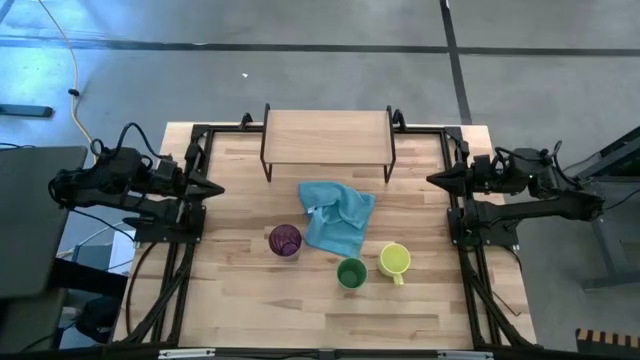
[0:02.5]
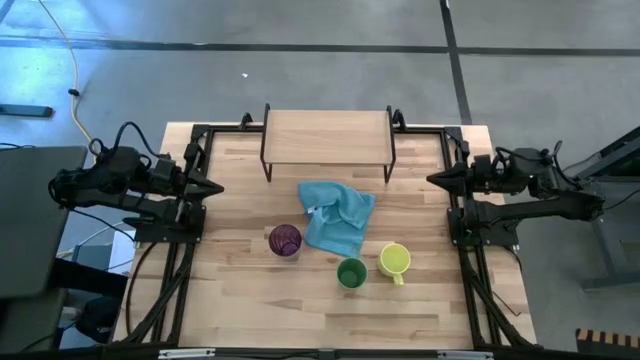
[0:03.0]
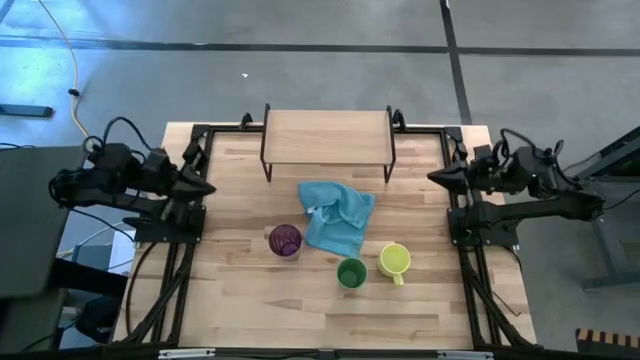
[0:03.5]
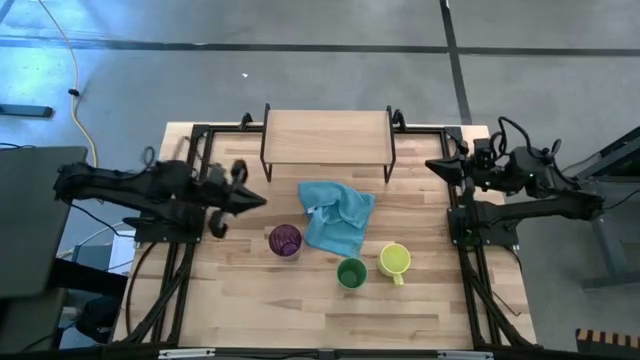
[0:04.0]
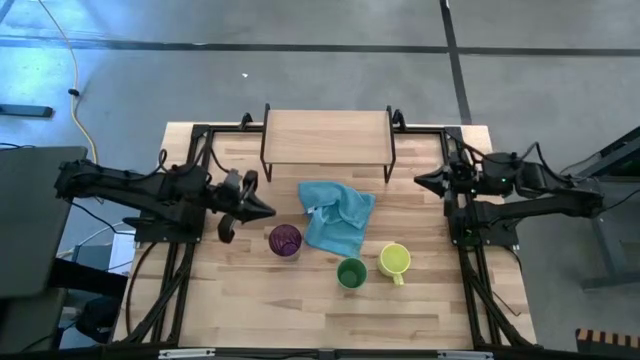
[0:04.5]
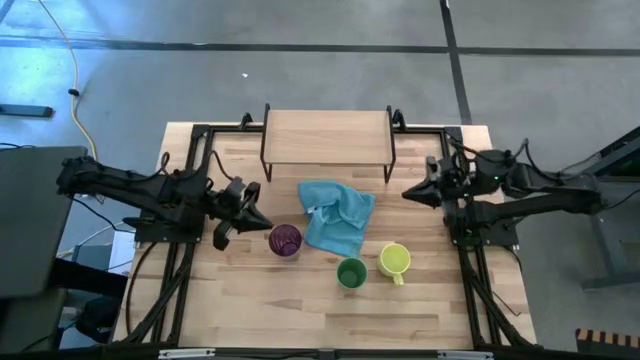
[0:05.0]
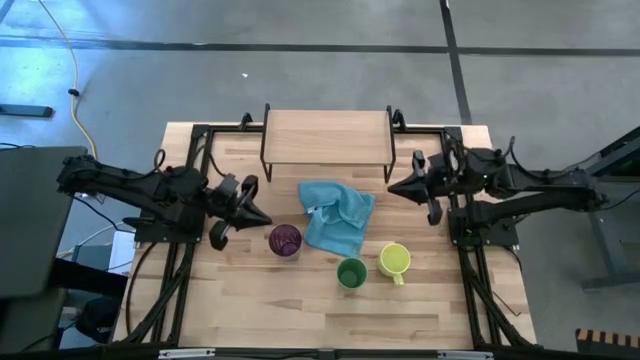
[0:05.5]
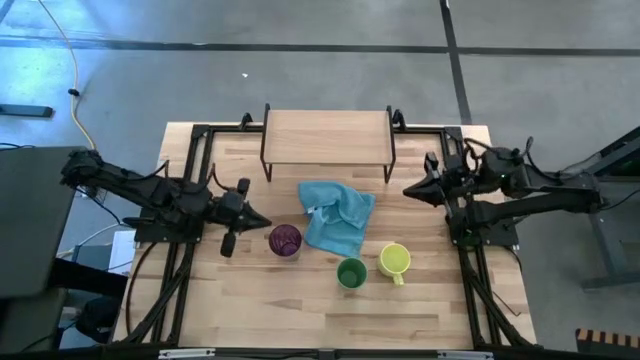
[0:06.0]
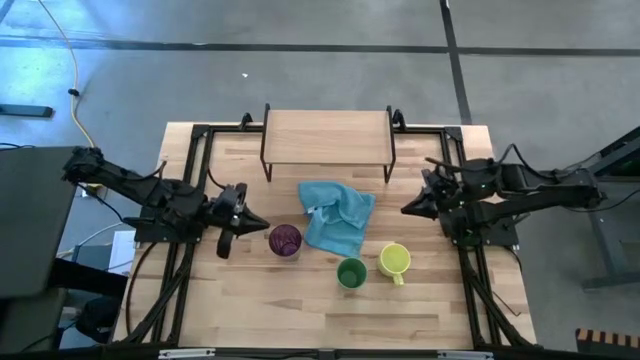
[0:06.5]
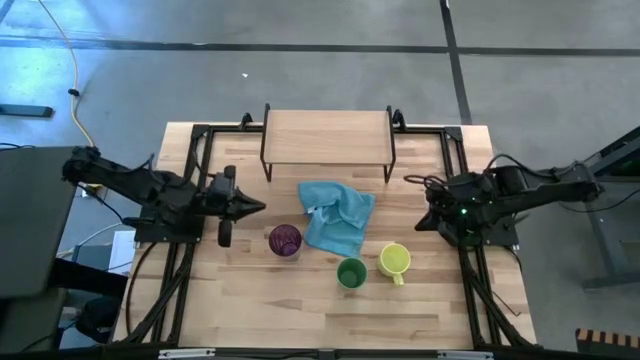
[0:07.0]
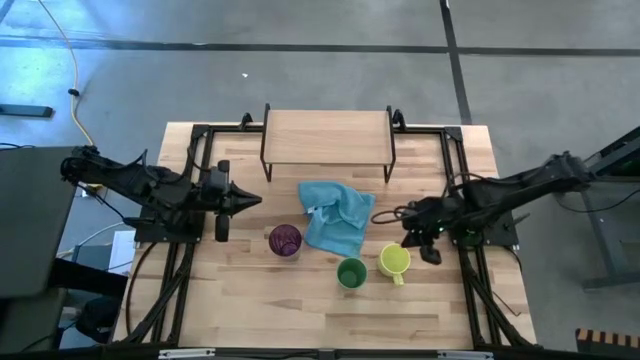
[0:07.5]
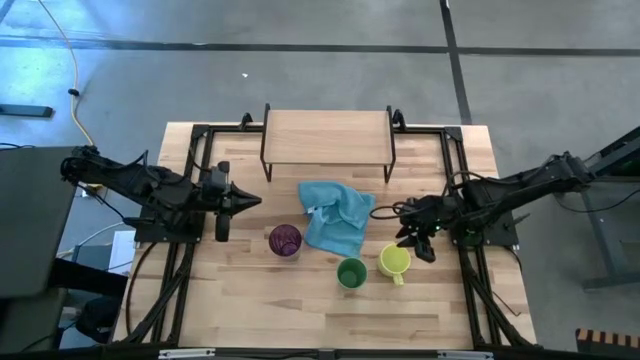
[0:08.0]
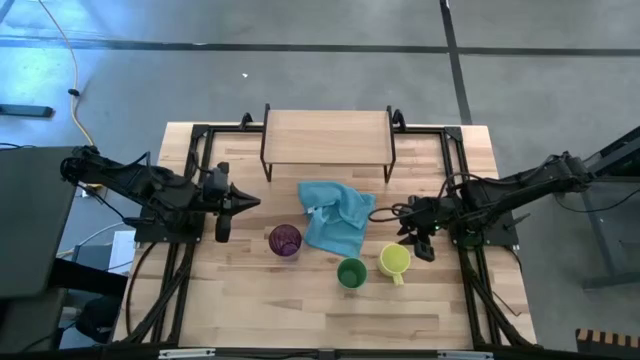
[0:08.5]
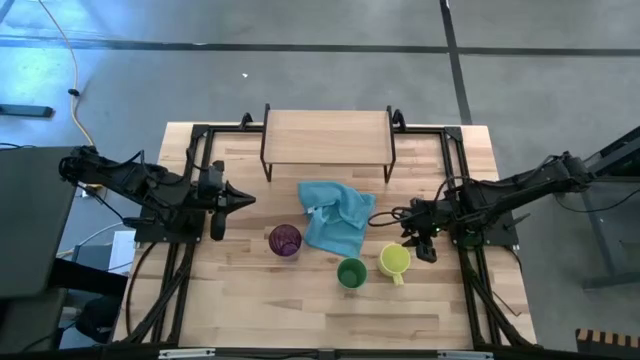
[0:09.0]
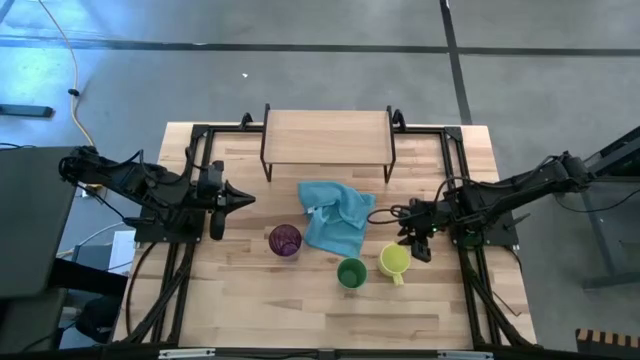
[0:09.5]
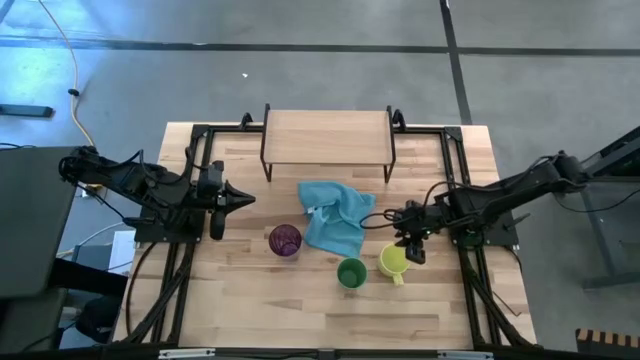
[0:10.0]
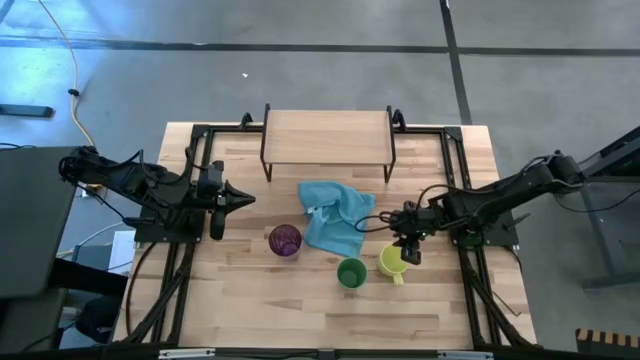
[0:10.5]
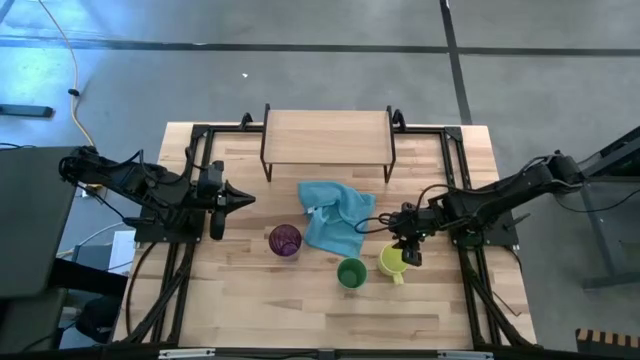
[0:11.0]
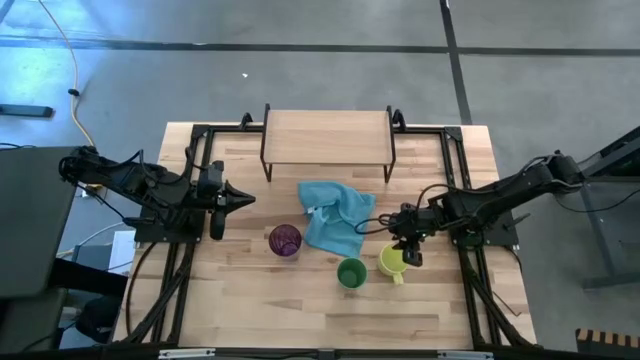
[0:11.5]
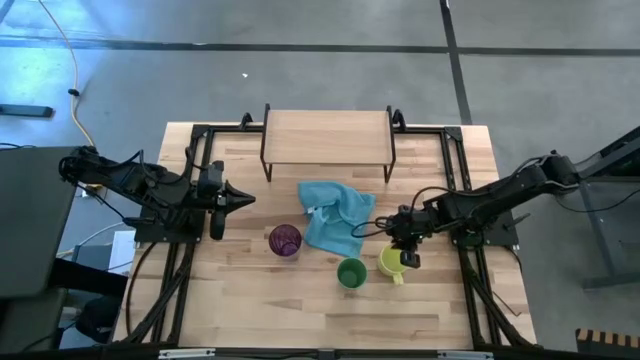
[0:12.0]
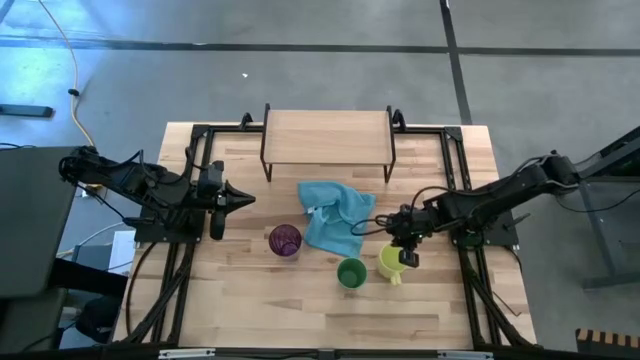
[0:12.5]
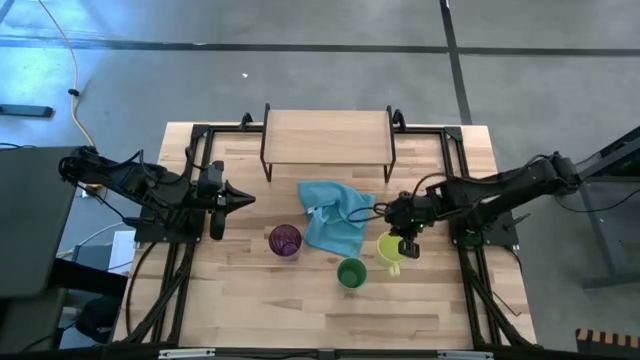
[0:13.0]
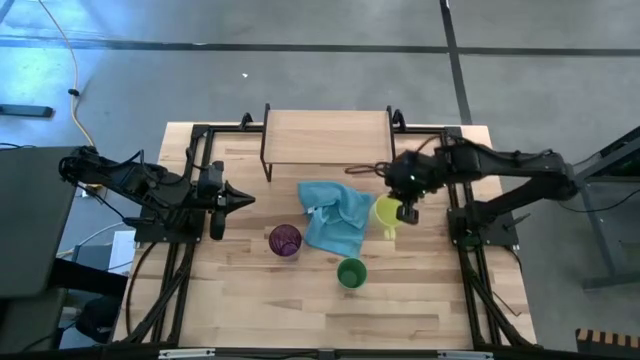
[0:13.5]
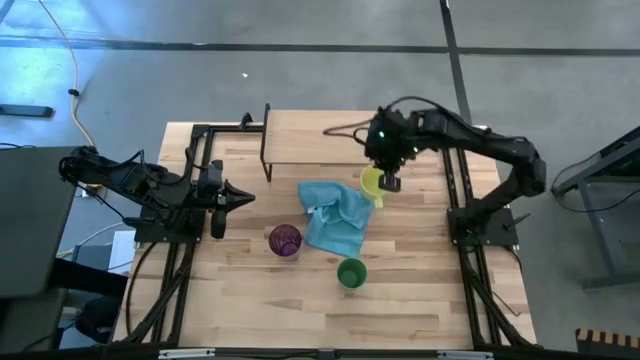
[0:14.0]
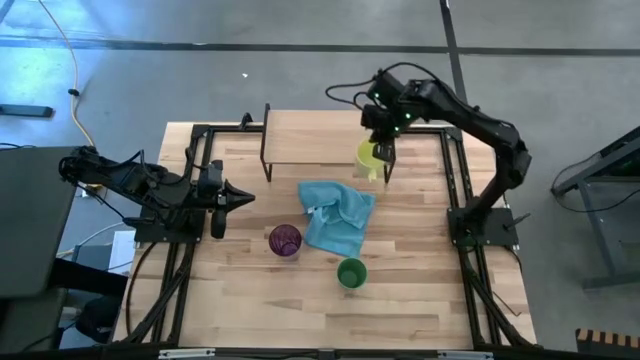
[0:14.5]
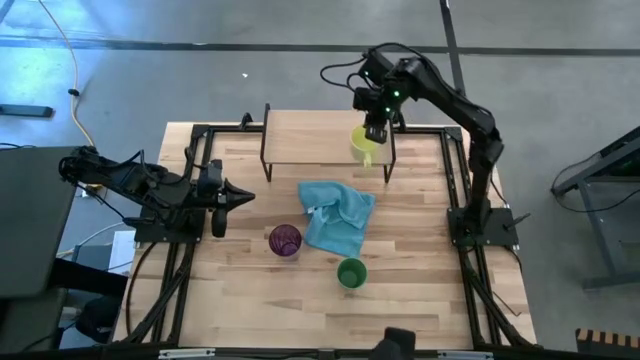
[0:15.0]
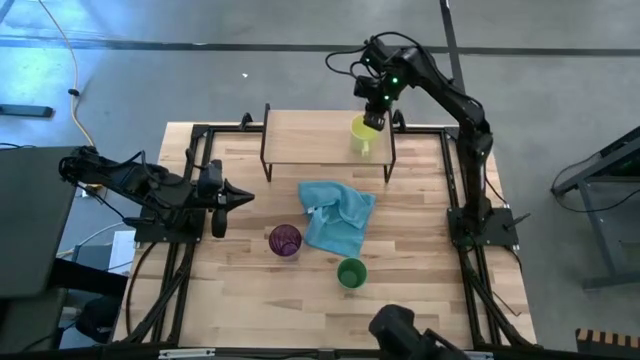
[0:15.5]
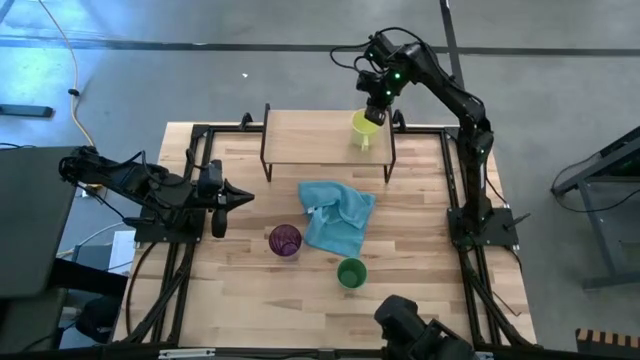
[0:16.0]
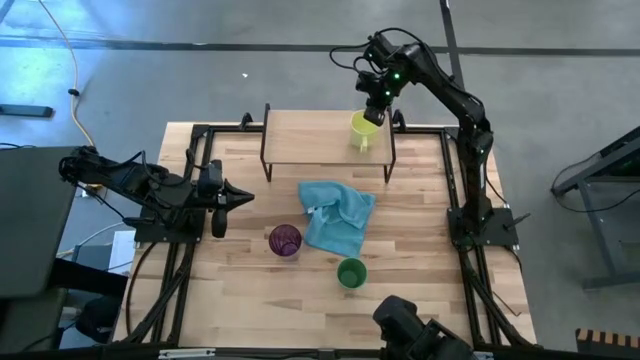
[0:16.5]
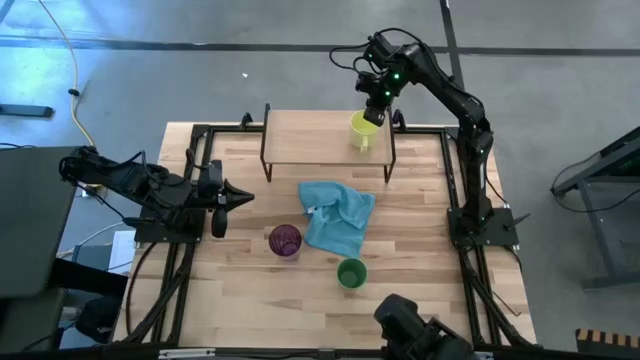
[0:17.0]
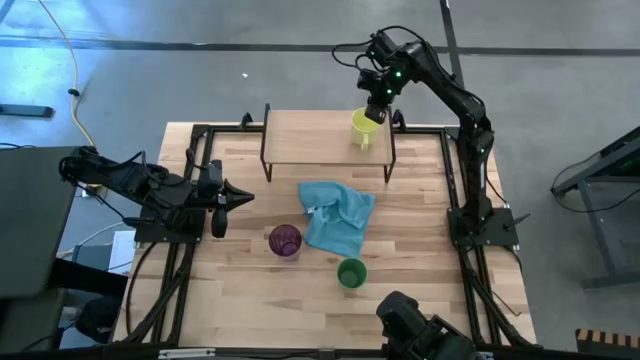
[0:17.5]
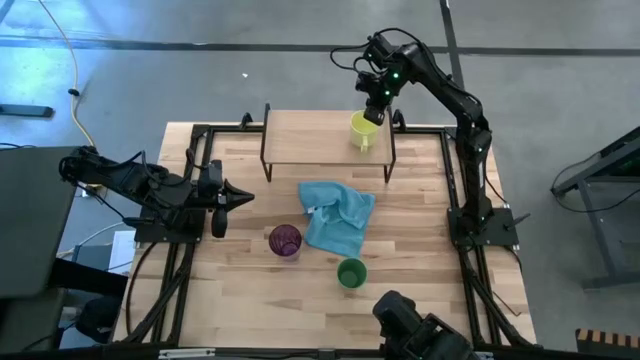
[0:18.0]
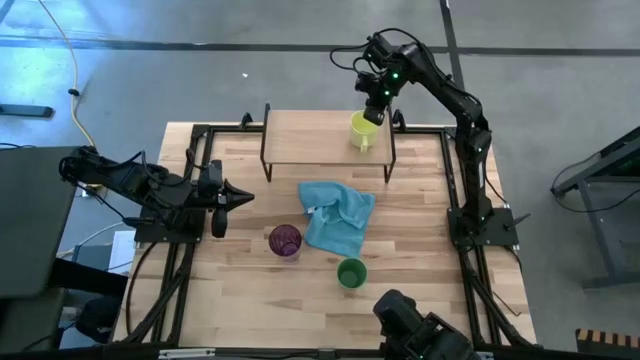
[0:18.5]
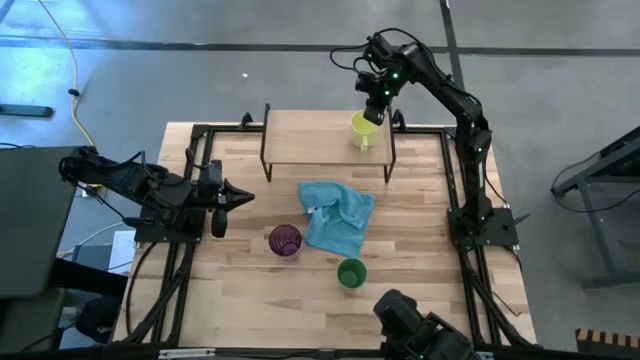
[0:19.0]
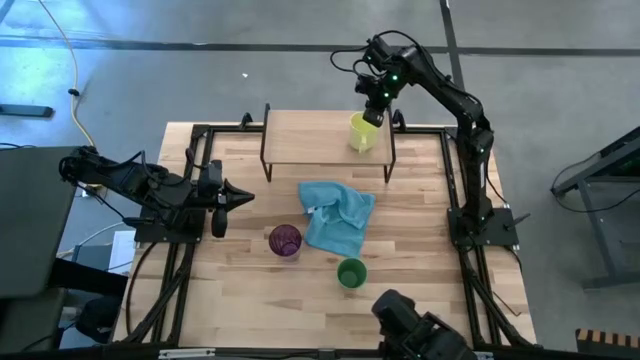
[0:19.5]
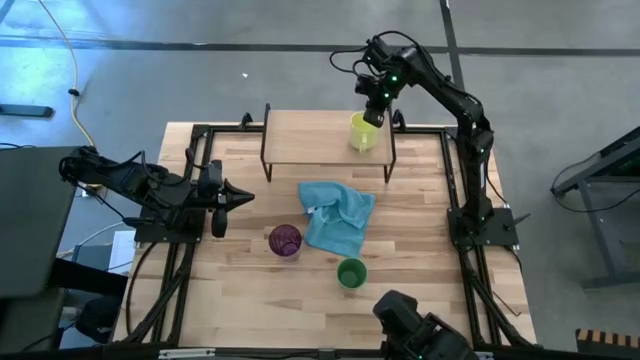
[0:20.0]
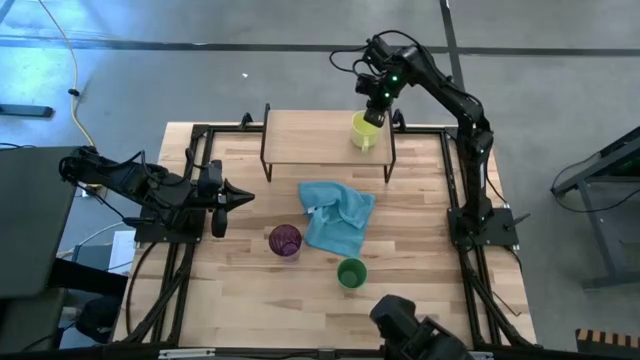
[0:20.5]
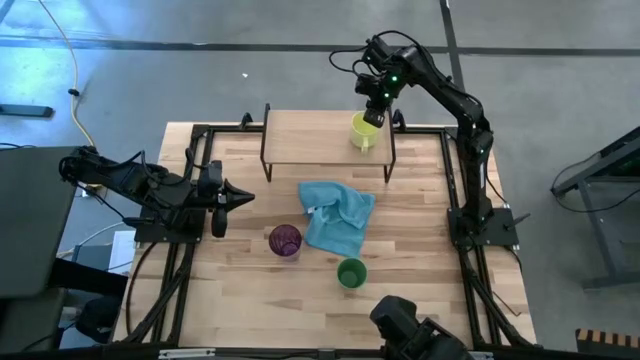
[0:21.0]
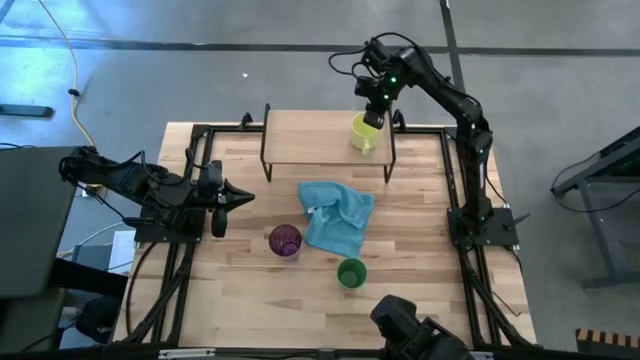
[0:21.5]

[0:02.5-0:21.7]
Task: Stack small to large cups/mugs on shelf
Put the yellow mug on the shelf
